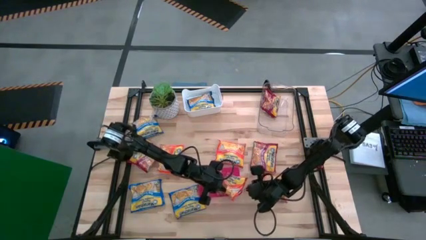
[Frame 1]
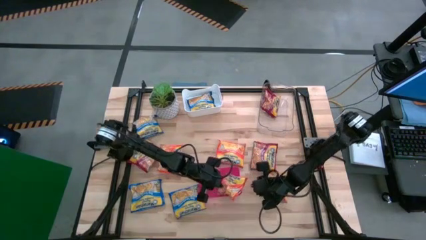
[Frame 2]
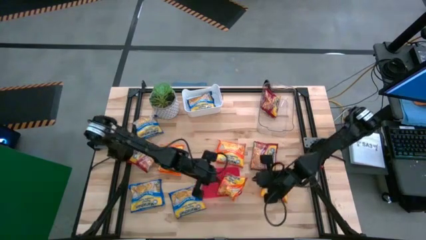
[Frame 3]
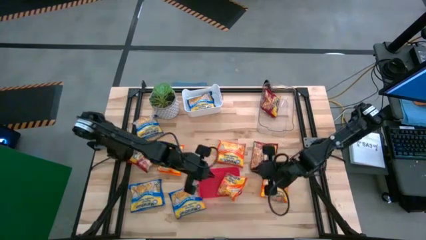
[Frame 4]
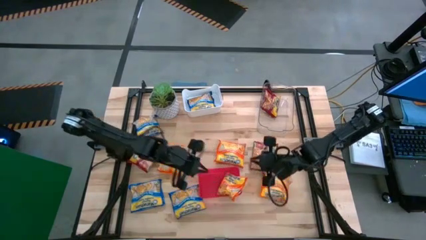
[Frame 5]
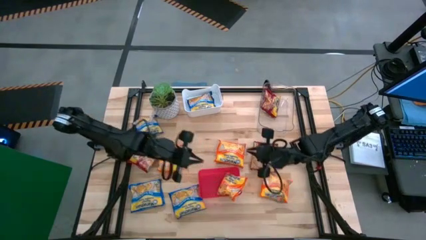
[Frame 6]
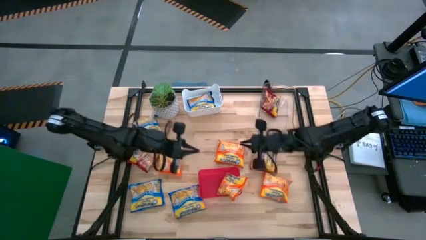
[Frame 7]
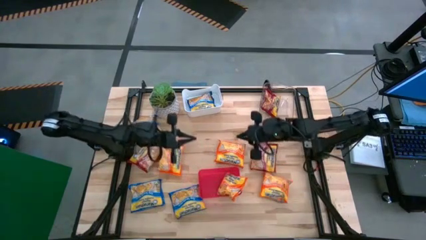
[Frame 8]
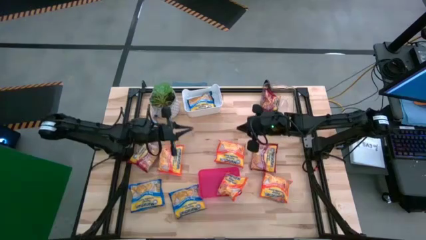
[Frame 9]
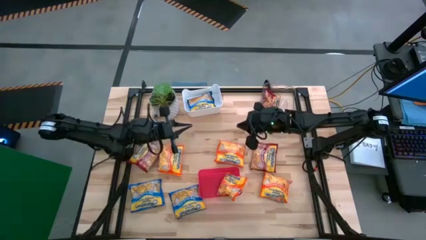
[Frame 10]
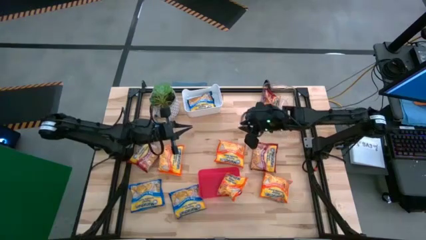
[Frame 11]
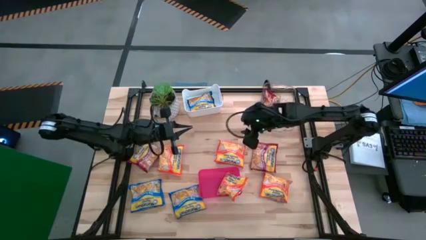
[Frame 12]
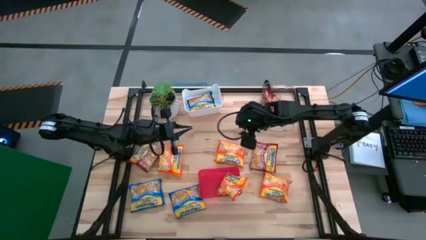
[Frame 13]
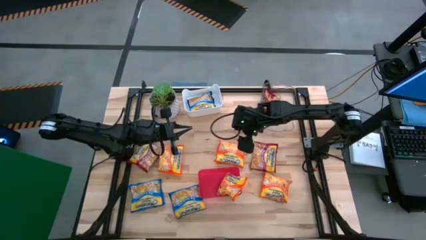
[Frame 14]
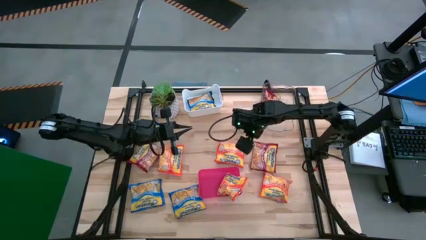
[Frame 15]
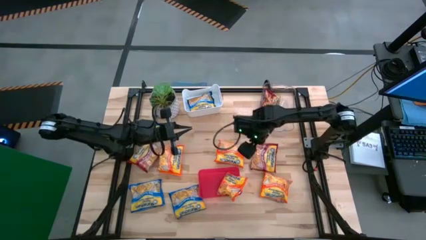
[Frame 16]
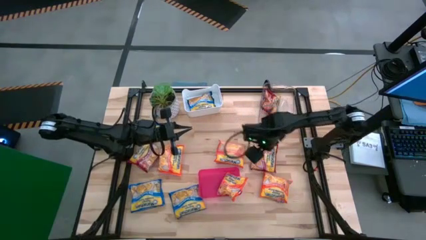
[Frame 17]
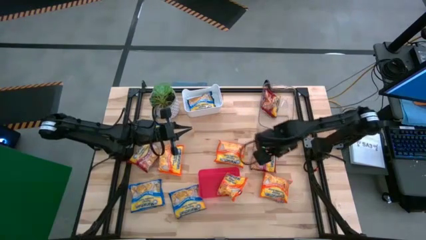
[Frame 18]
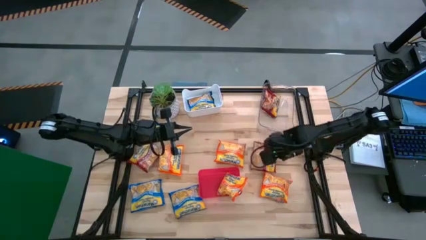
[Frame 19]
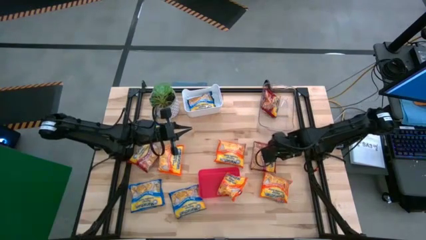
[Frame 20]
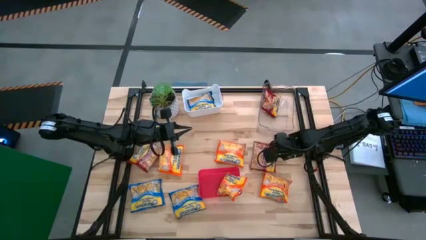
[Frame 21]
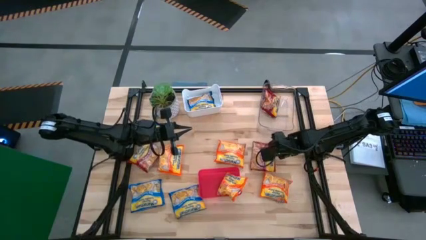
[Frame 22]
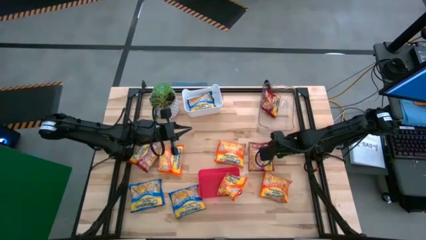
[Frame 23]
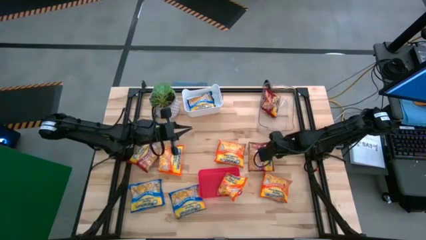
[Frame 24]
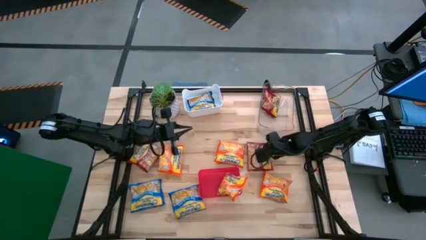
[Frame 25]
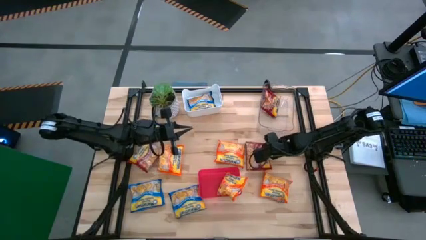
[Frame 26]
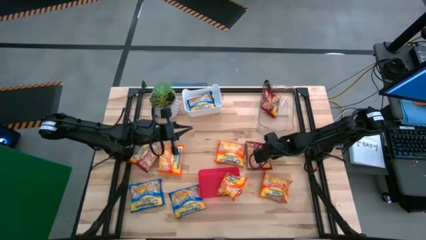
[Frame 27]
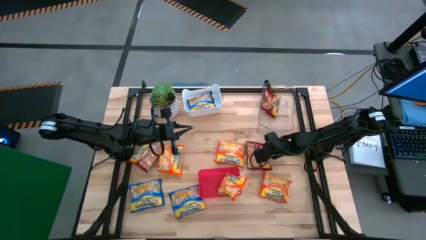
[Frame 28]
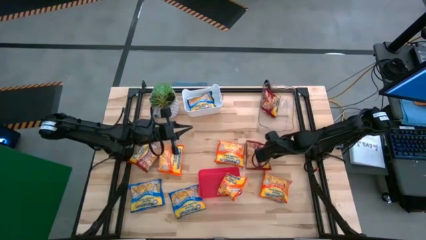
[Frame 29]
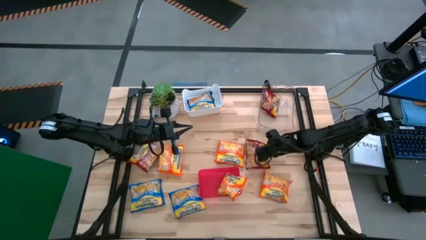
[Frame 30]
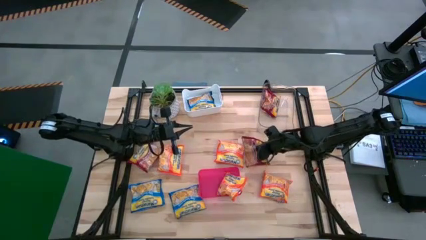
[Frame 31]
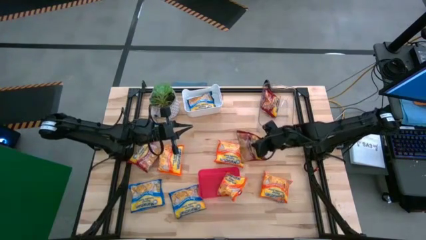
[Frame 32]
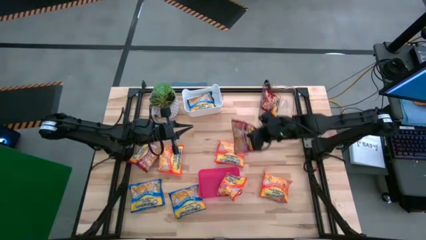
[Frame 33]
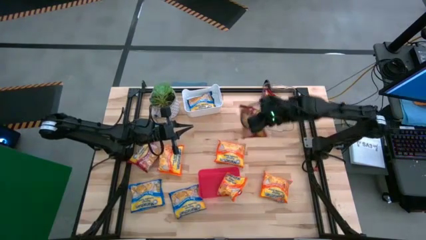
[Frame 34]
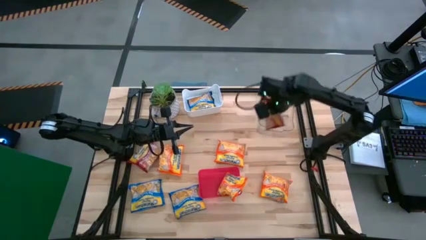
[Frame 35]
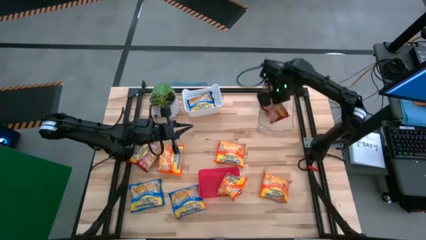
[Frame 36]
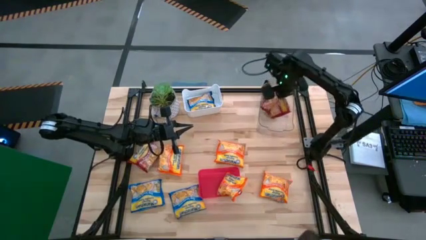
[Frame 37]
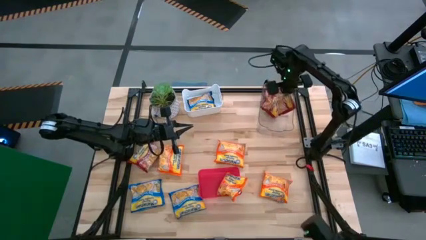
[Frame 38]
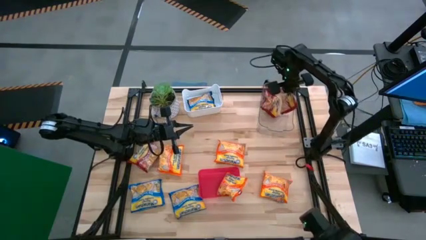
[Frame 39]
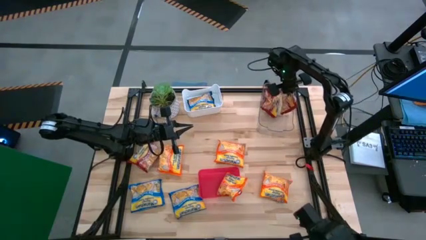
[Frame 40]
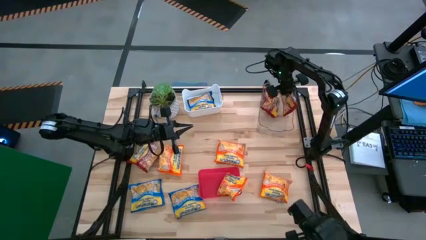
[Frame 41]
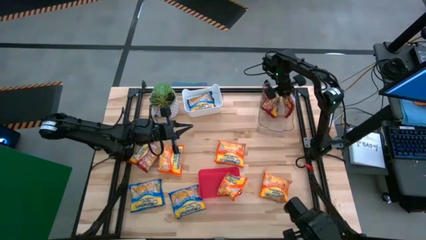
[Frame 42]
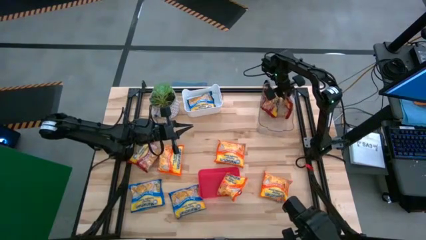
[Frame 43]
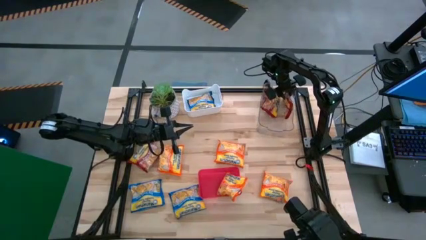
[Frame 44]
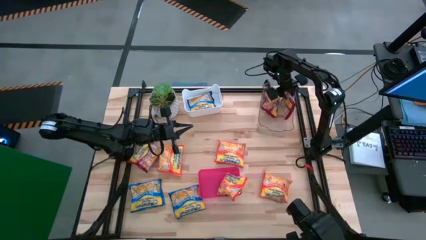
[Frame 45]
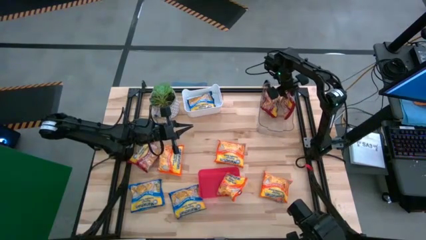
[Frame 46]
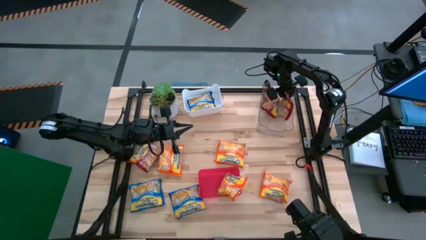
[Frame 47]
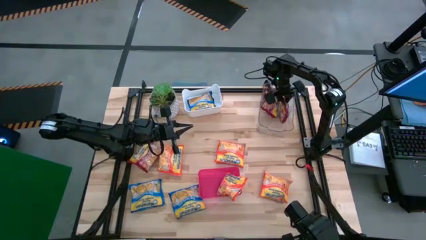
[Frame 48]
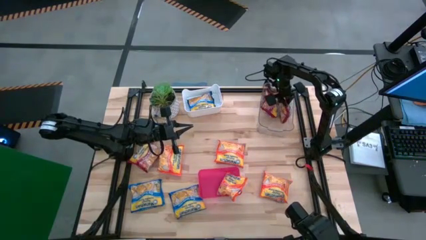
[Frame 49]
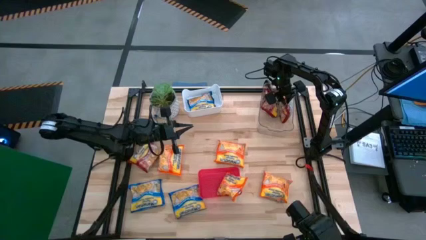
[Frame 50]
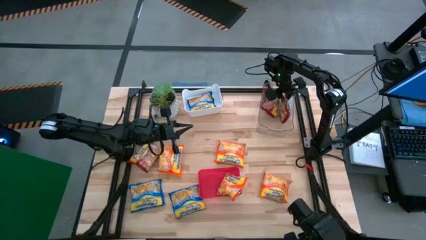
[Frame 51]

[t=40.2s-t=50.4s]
Task: Sort Maruchan noodles
Put the red noodle pack into the transparent bin

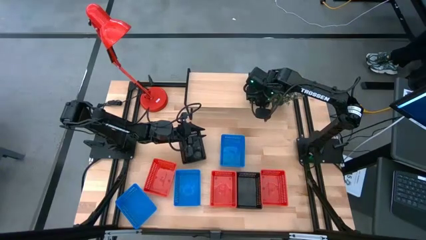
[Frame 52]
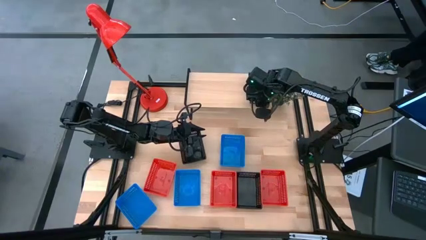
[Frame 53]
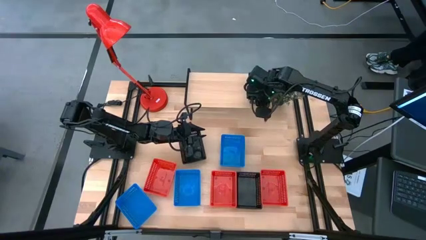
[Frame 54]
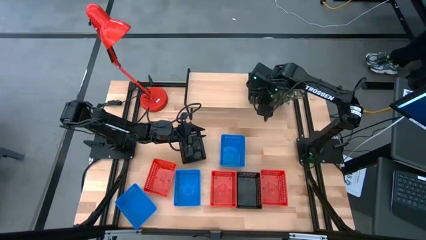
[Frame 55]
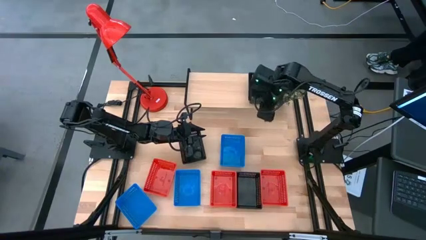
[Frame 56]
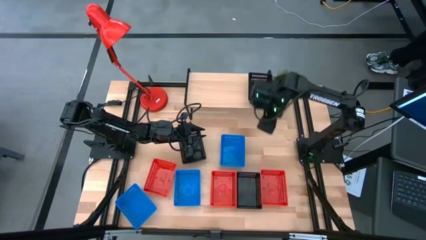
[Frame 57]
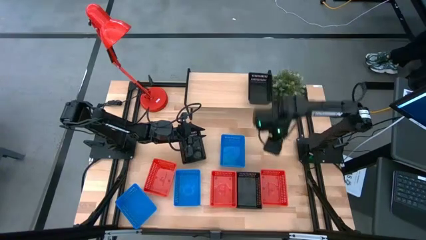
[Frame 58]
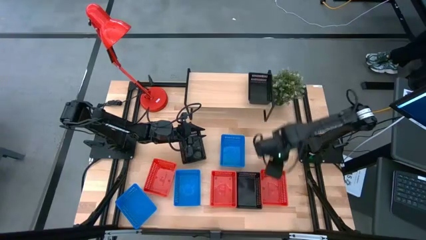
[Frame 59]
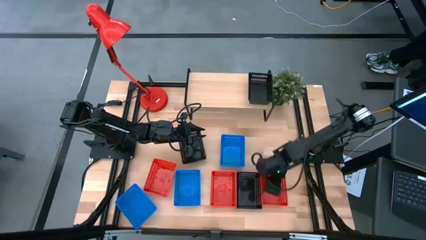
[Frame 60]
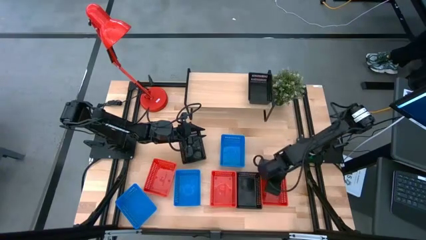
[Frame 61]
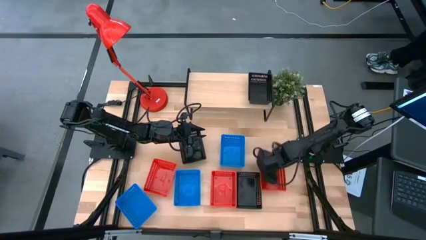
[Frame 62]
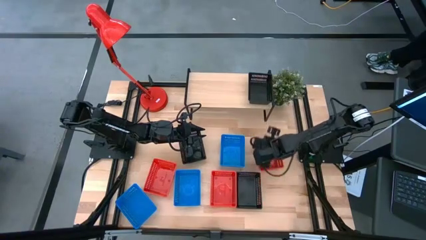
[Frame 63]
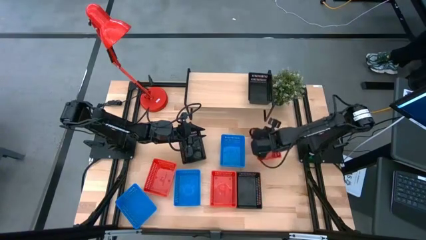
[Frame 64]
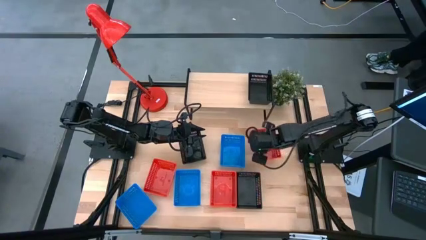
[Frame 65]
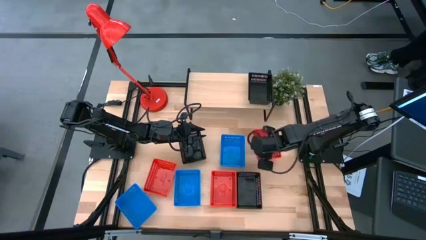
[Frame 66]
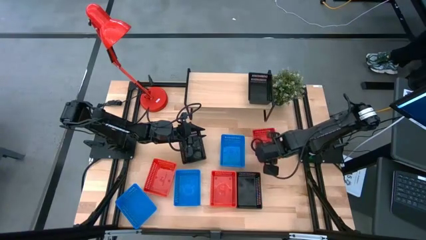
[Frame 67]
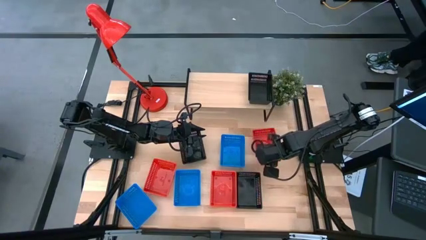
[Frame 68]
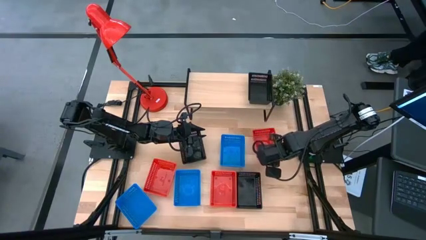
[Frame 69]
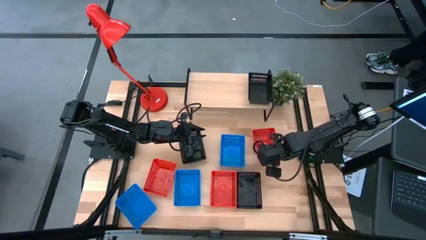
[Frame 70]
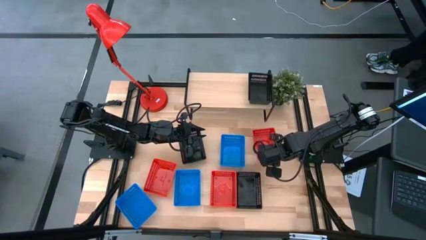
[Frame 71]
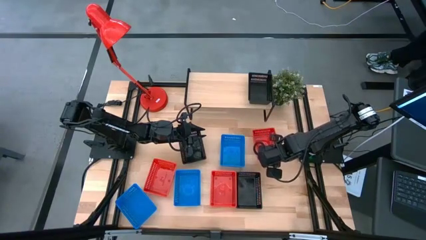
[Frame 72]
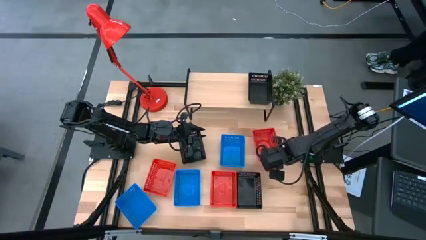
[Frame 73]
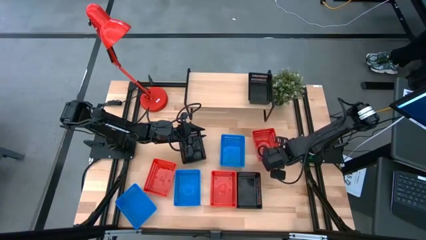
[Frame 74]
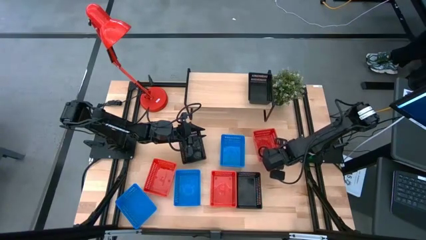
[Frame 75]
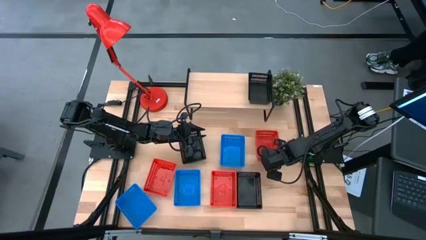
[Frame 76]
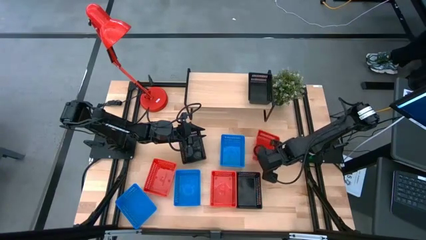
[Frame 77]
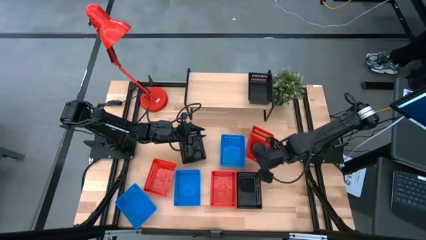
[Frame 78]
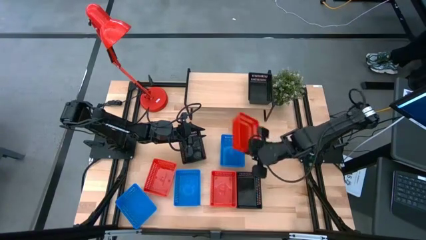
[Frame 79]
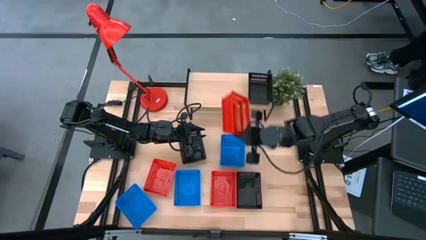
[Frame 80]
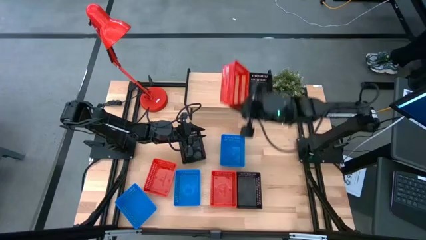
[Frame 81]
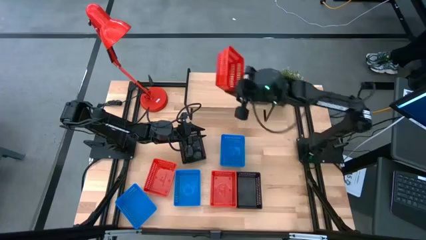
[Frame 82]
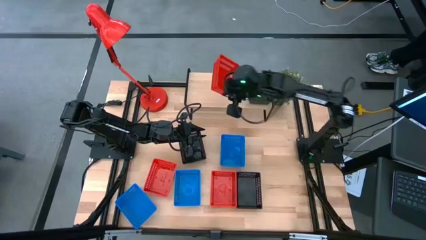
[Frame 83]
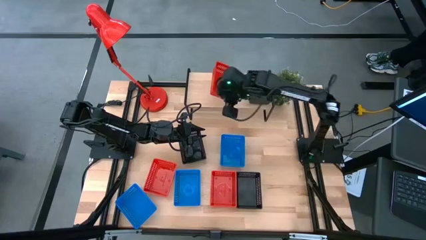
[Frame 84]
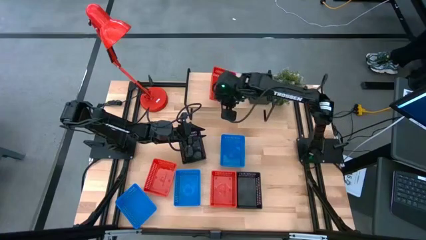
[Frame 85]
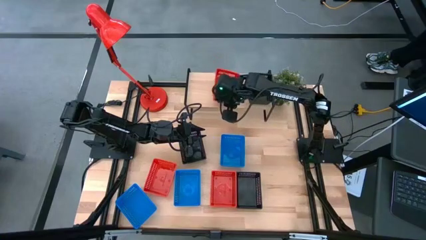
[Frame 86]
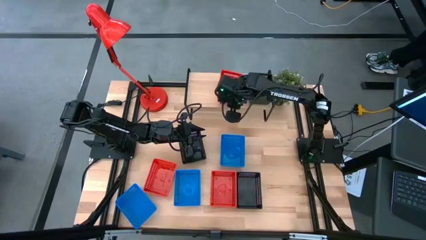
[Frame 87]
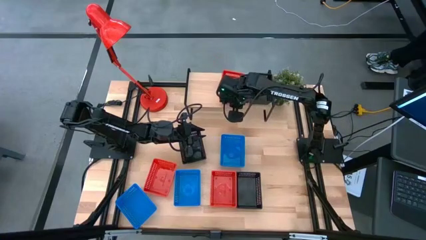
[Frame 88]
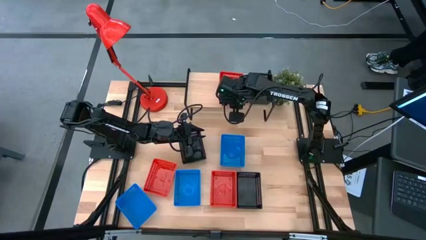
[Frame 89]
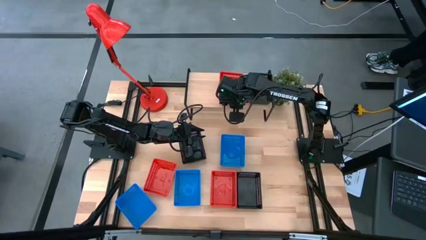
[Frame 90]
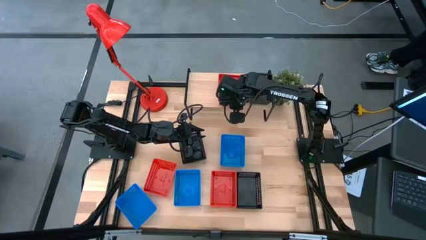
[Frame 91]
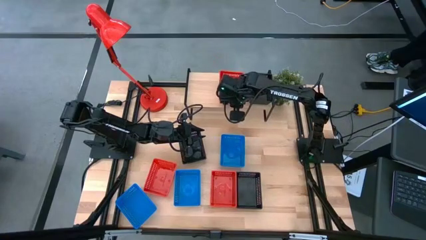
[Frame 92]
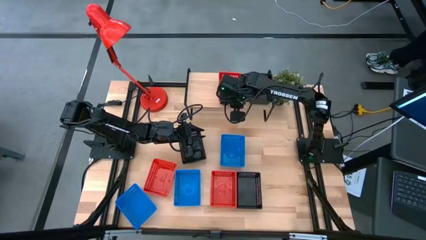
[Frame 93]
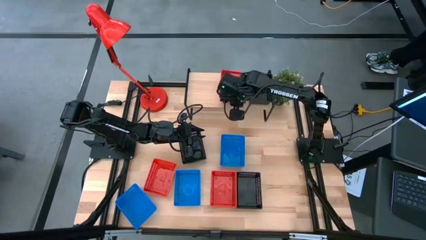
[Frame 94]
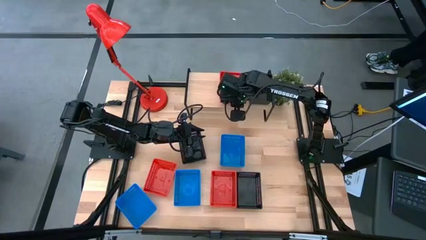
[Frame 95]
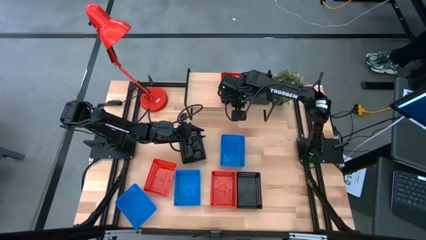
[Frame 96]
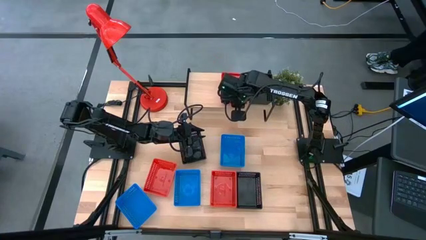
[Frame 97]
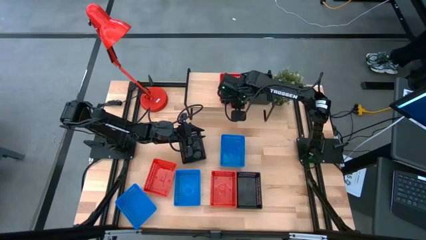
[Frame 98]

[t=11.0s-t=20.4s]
Task: Stack baskets on shelf by color
Put the right red bin on the shelf
